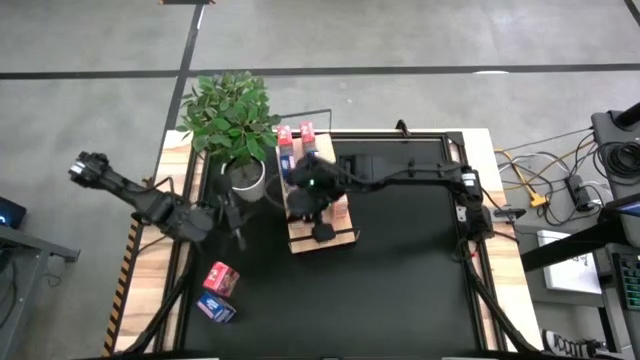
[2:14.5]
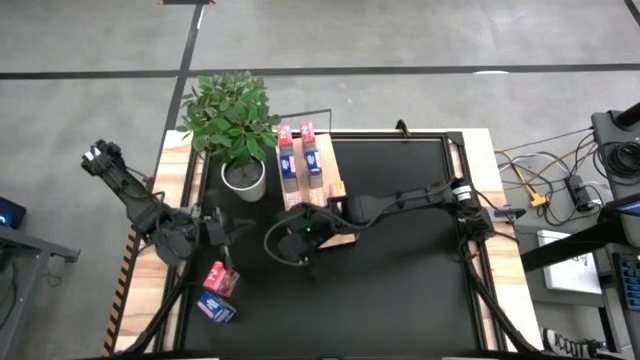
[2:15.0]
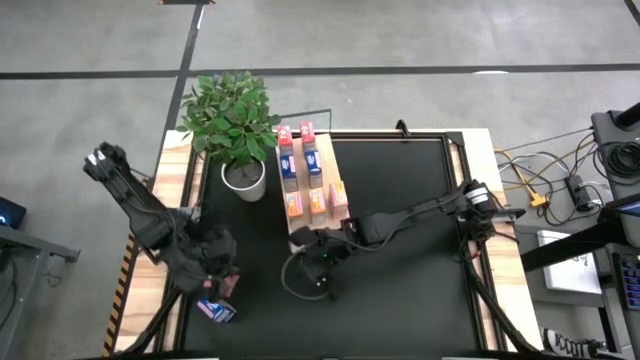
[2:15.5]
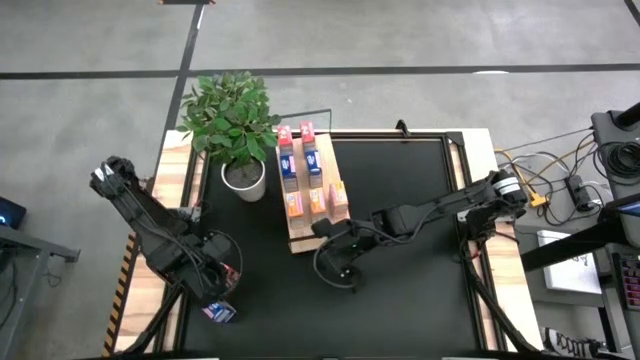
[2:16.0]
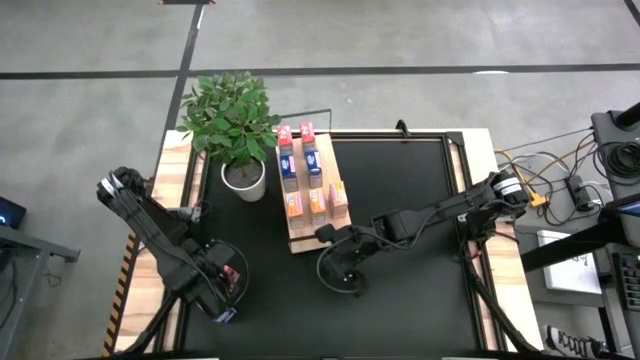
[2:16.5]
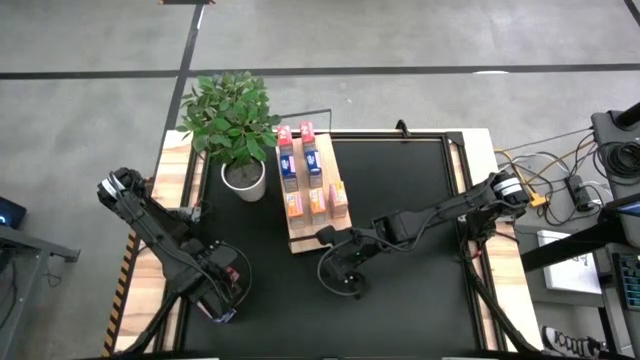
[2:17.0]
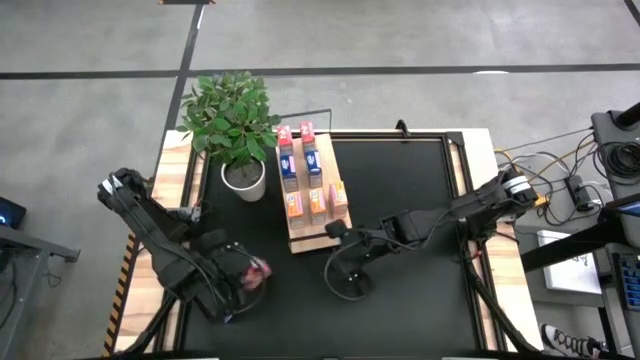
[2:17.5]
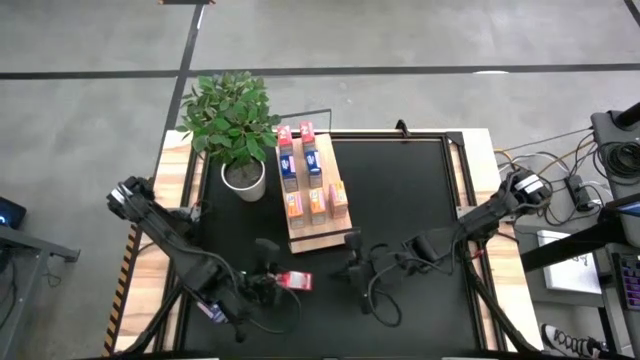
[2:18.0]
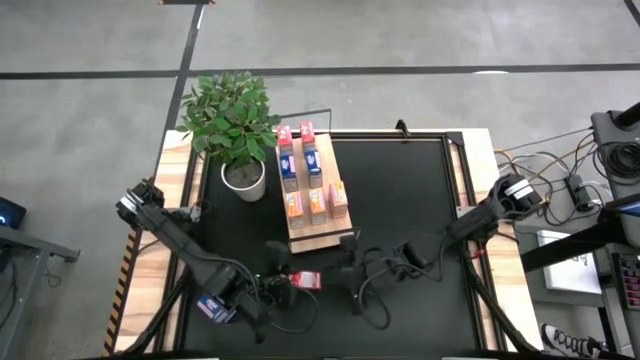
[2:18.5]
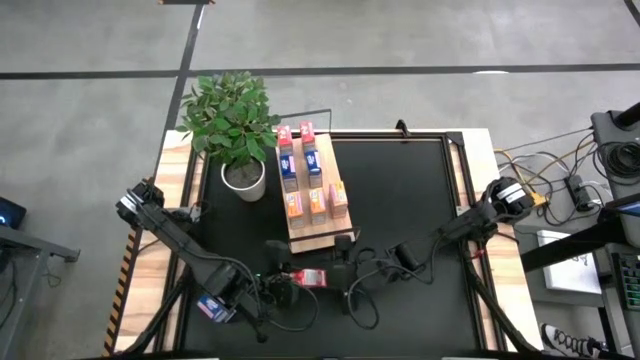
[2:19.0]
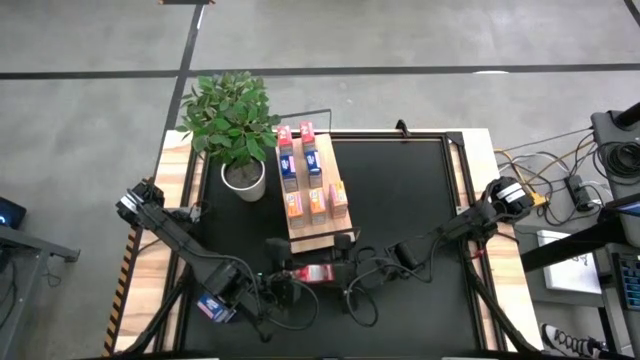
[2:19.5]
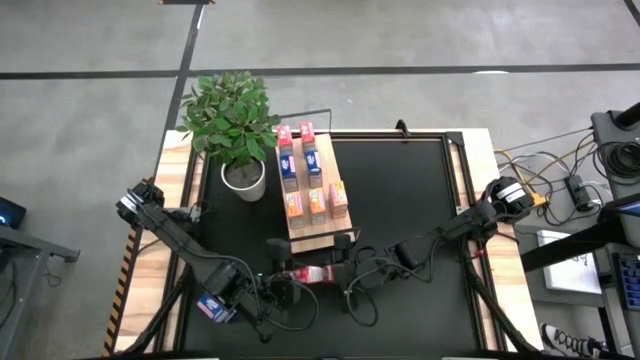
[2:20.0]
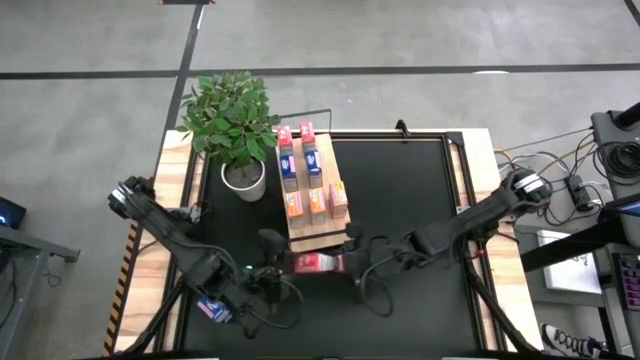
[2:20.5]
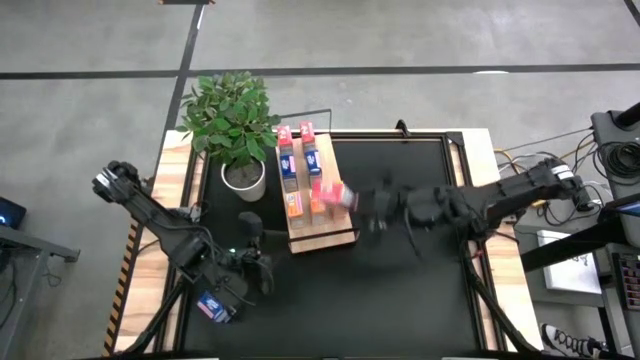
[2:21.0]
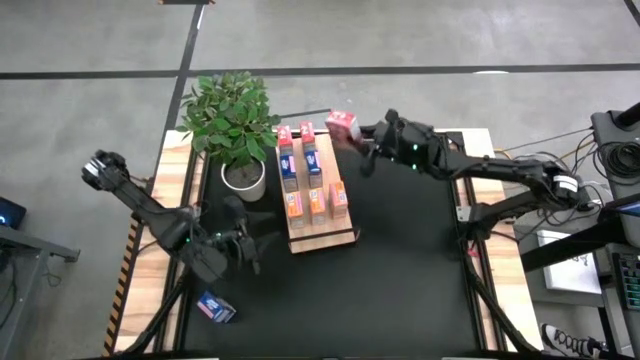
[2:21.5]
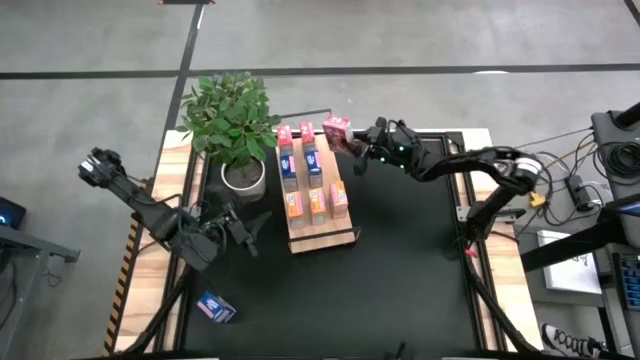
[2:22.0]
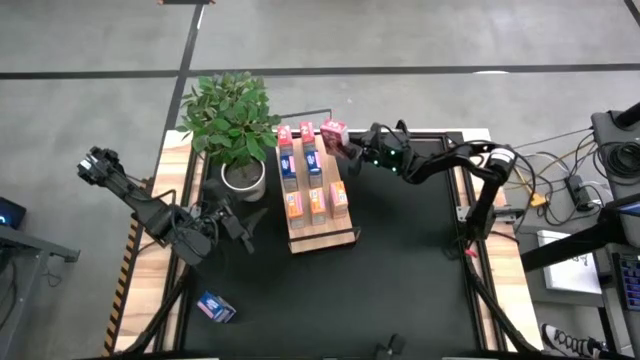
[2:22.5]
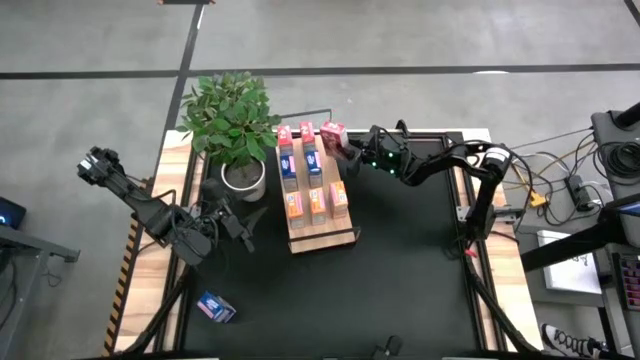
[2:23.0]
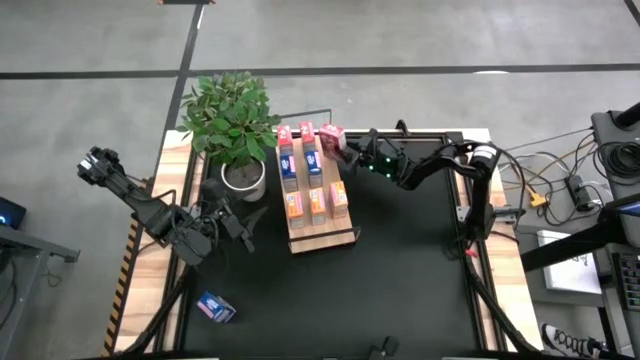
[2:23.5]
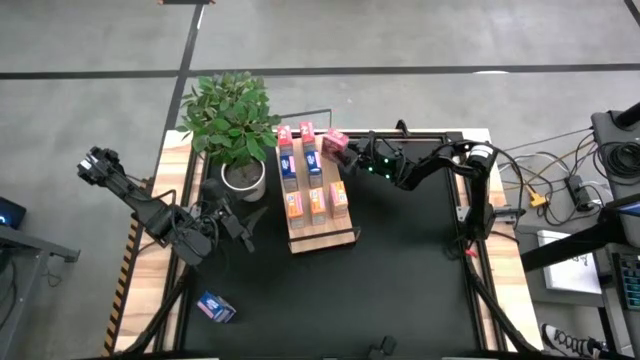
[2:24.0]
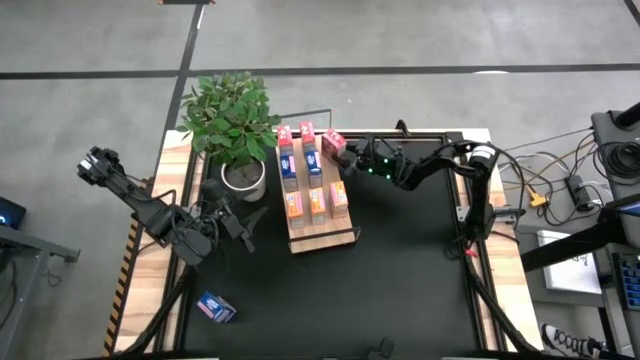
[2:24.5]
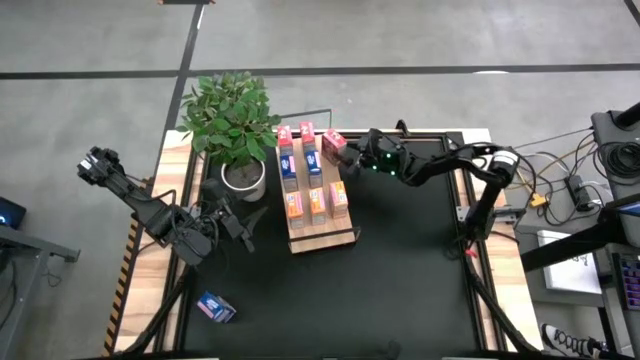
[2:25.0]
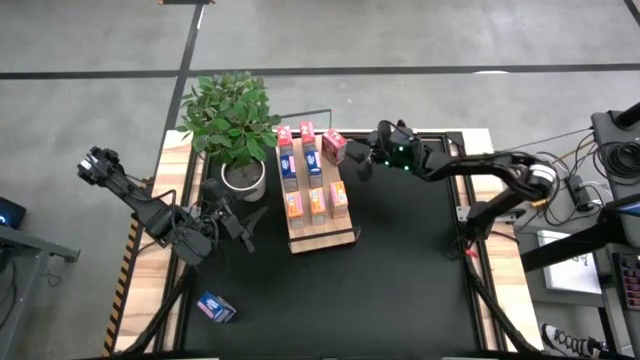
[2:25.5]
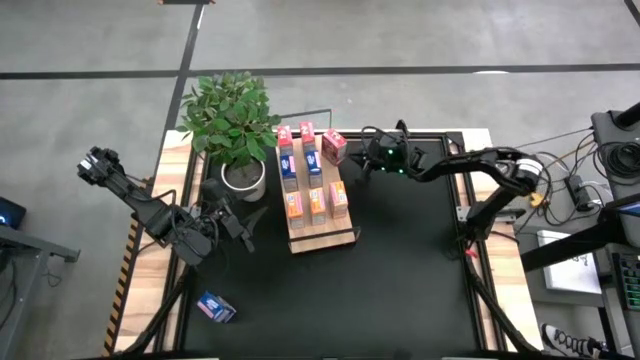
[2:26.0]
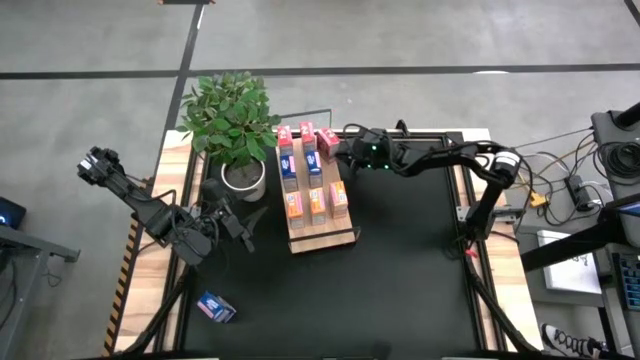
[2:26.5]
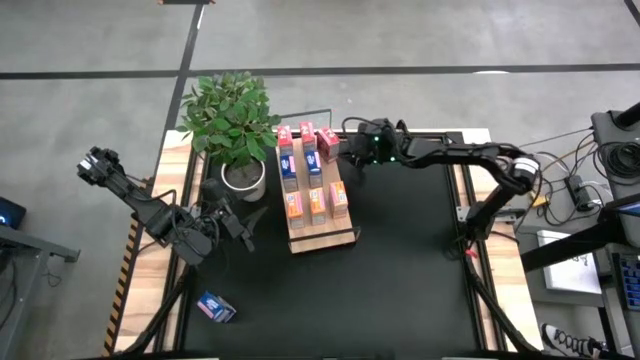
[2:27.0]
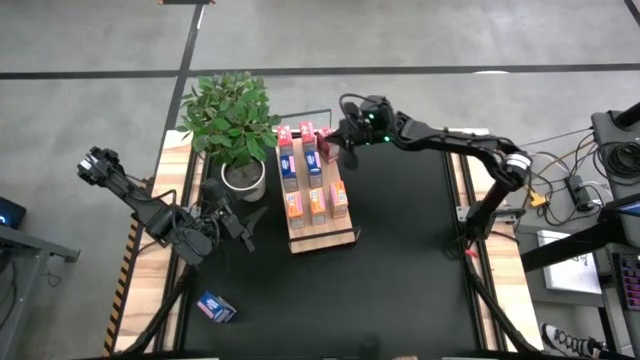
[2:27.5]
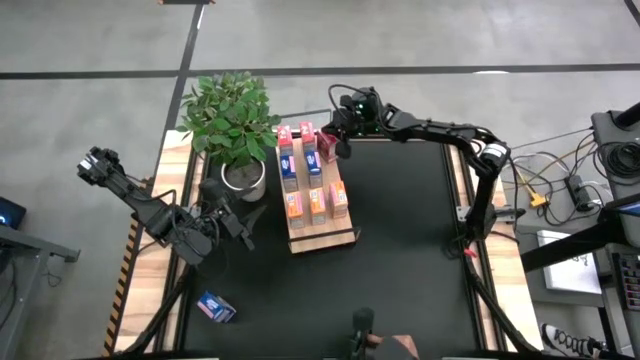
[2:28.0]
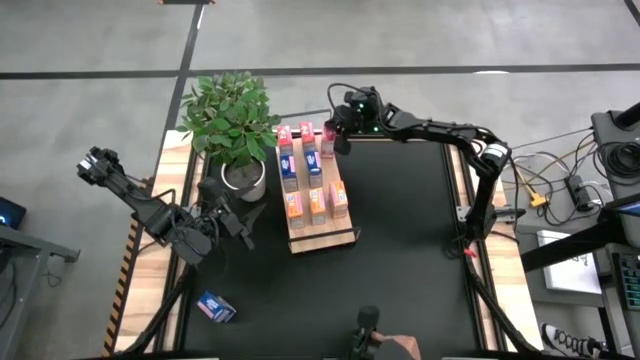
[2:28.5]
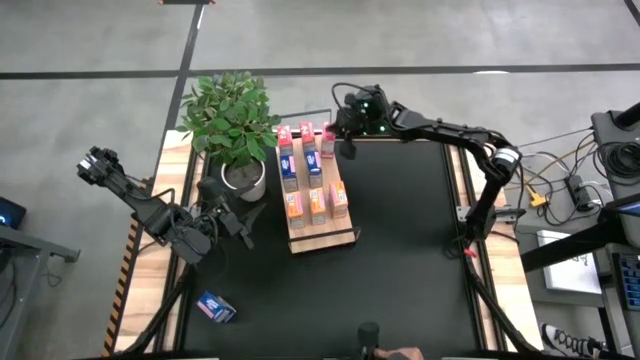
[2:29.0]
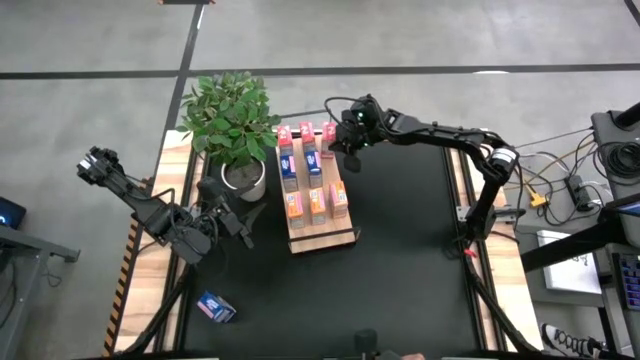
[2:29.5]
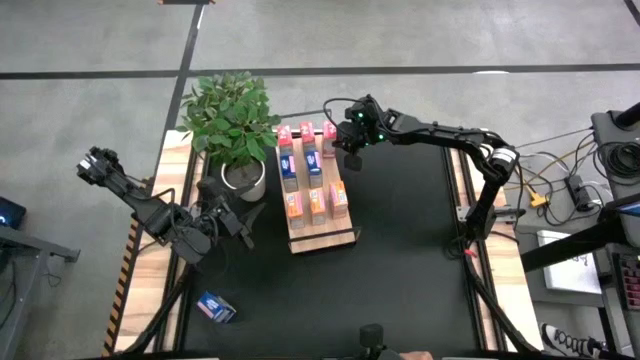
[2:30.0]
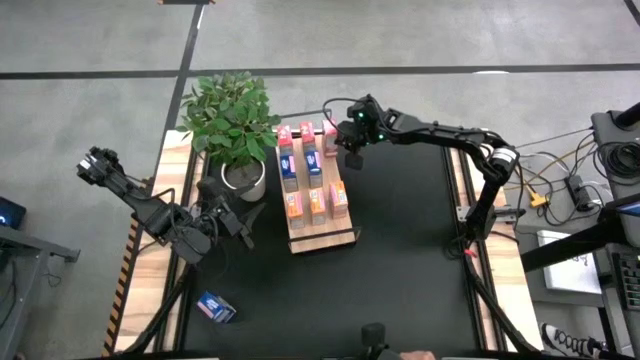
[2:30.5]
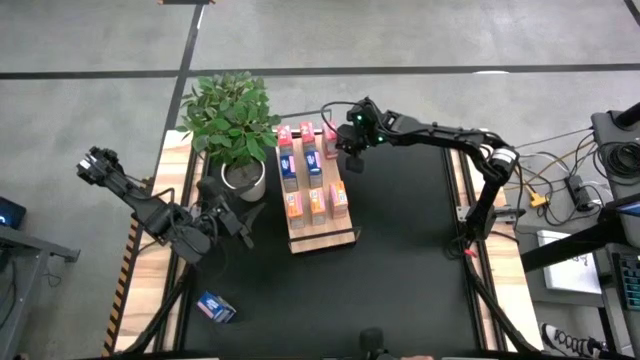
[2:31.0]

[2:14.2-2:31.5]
Task: Stack cereal on shelf
Put the red cereal box on the shelf aligned with the other red cereal boxes

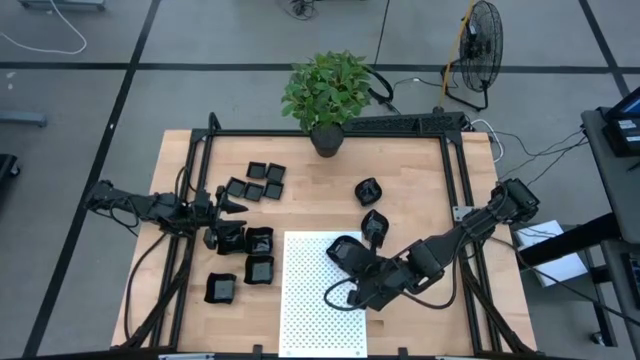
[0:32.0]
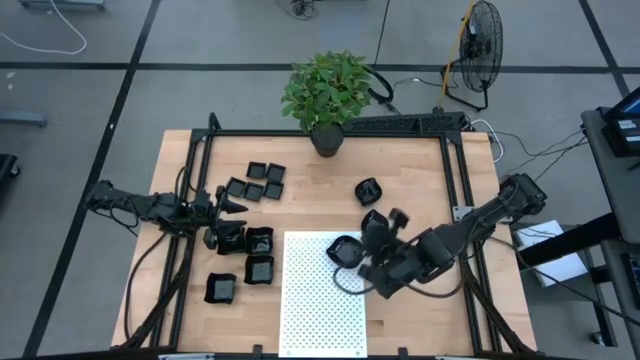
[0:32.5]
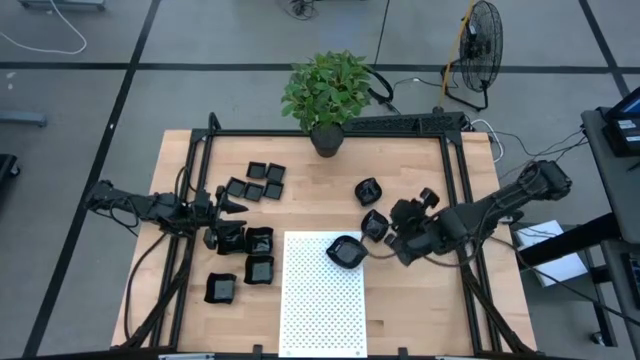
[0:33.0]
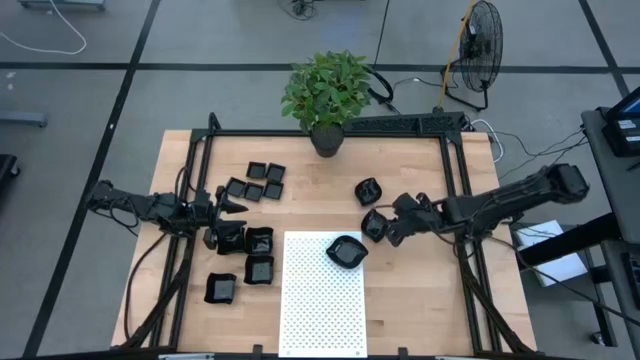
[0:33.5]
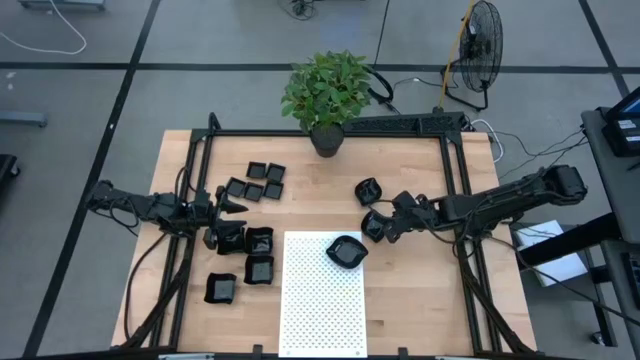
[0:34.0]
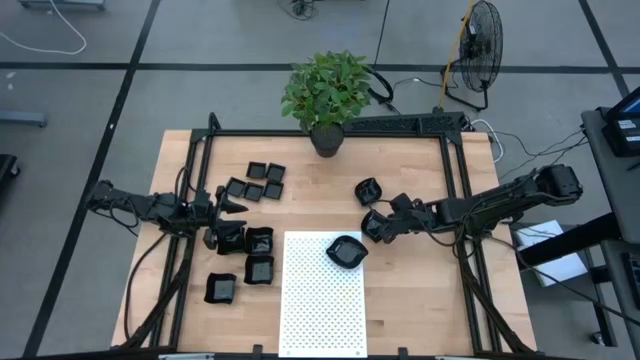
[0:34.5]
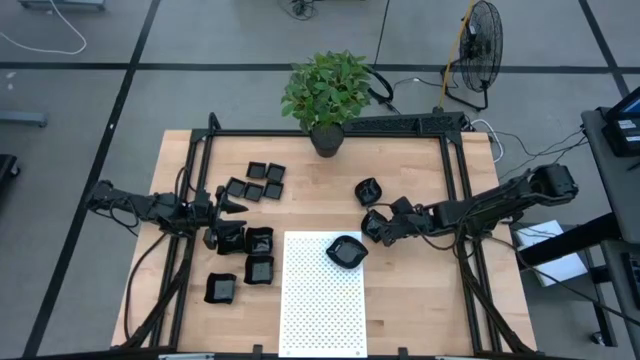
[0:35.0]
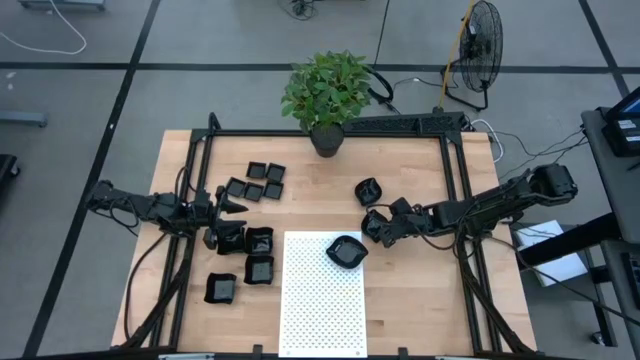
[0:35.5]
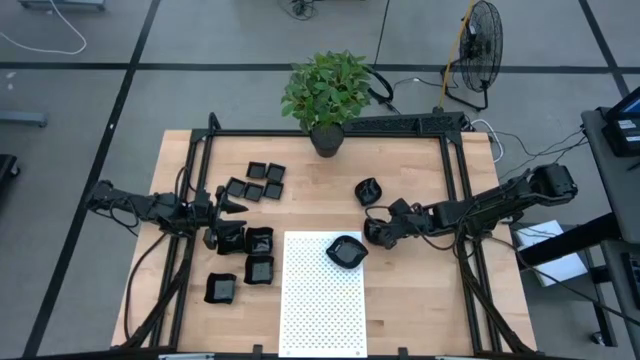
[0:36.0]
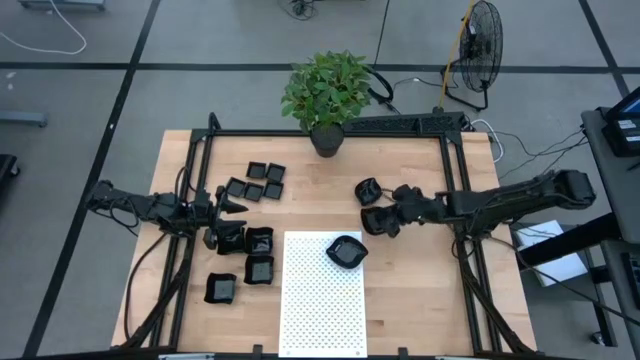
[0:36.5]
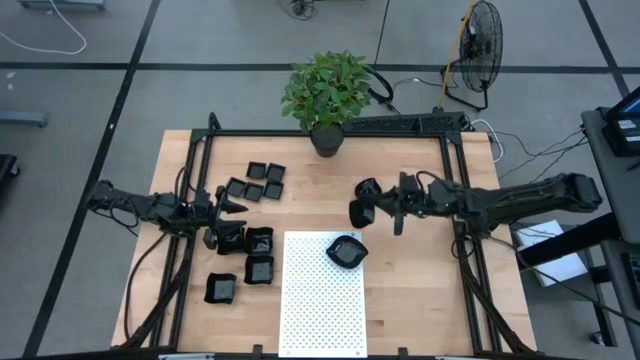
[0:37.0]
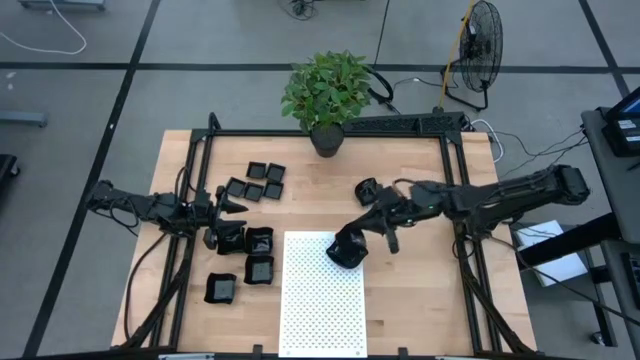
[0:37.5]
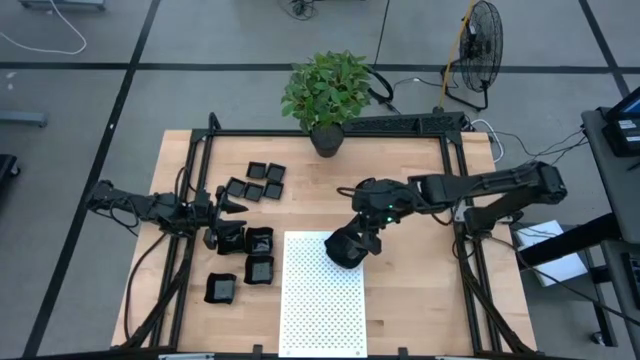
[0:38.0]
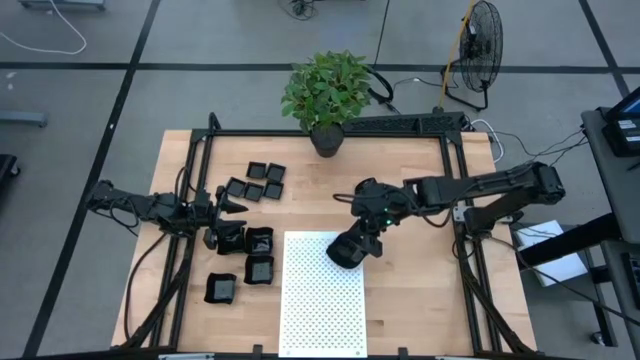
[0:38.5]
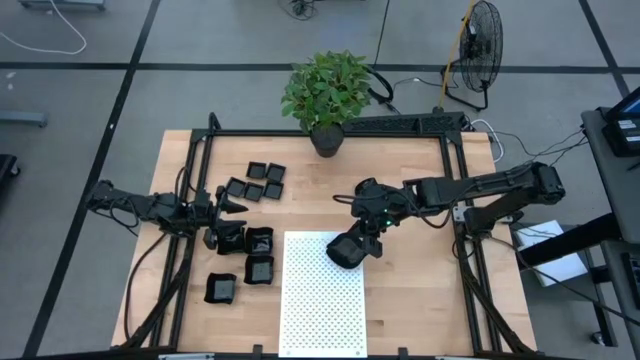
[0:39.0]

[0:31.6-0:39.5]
Task: Pick & Place Mini shaped plates
Stack the bottom leaf shaped plate on top of the leaf shaped plate on the shelf
